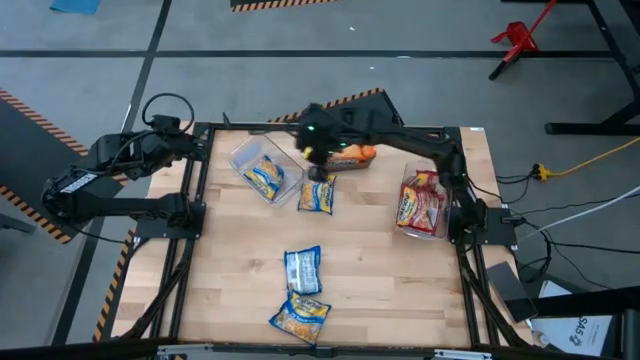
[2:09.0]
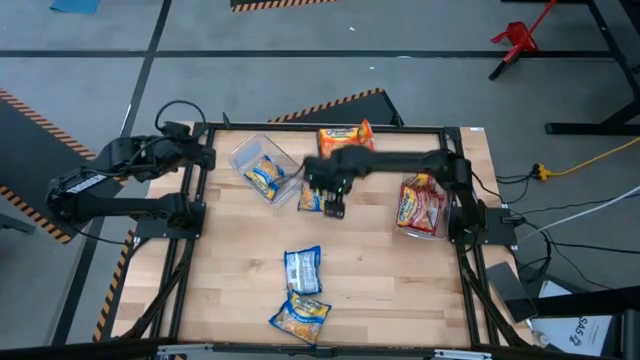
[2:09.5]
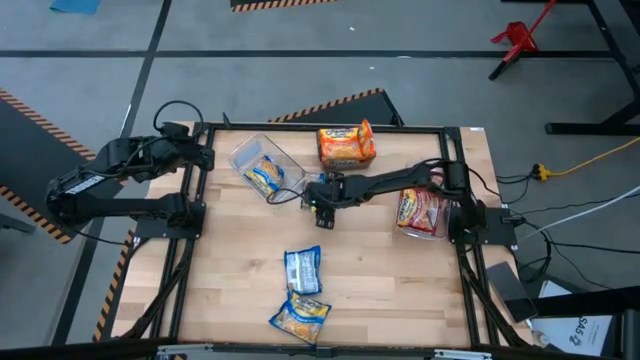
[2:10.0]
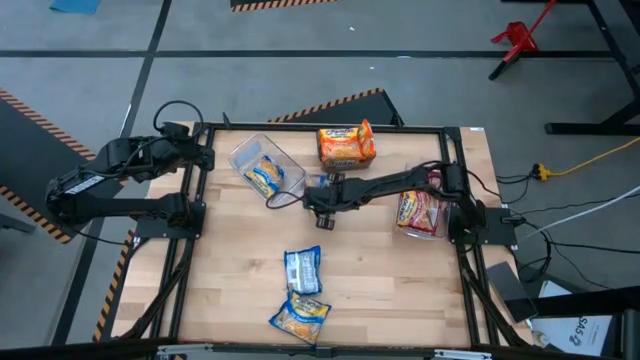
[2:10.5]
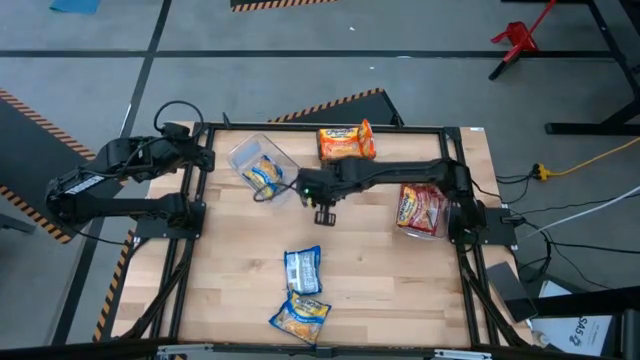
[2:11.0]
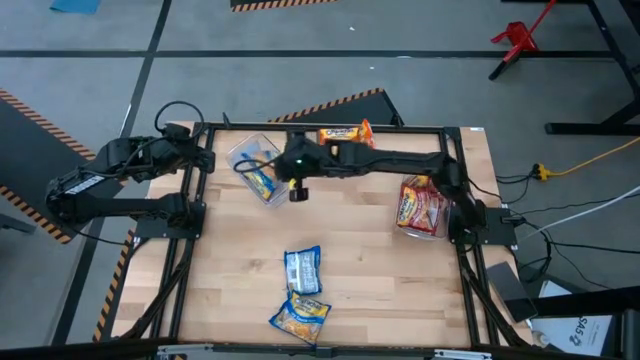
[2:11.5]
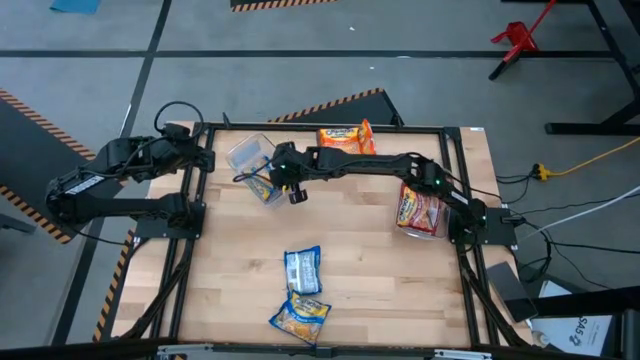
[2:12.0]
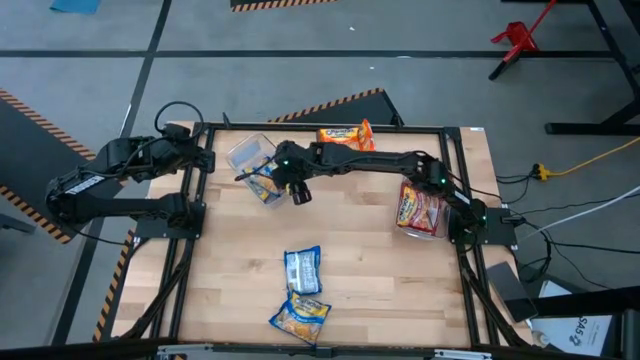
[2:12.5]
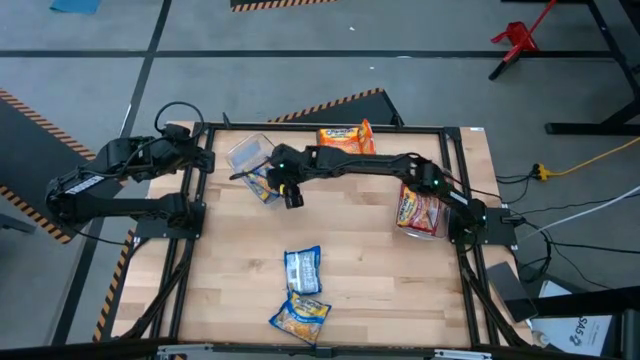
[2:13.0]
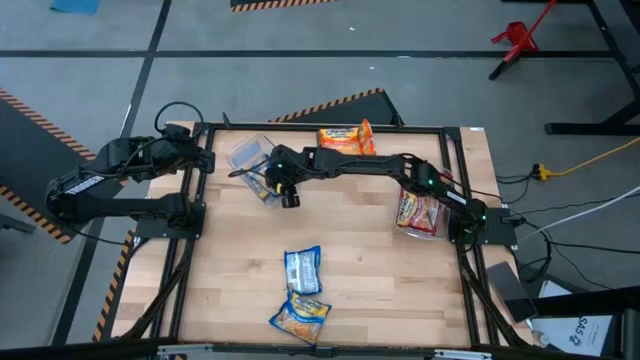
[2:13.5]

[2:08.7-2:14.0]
Task: Sort Maruchan noodles
Put the blue noodle pack into the left transparent bin

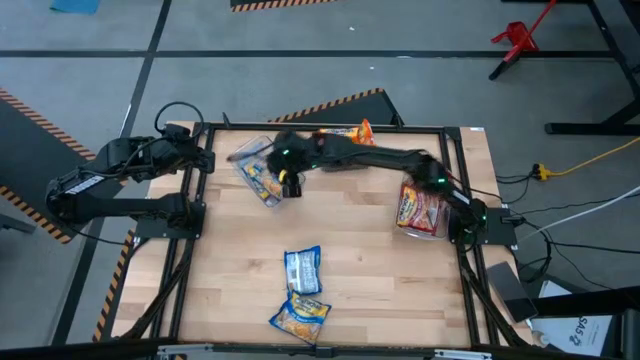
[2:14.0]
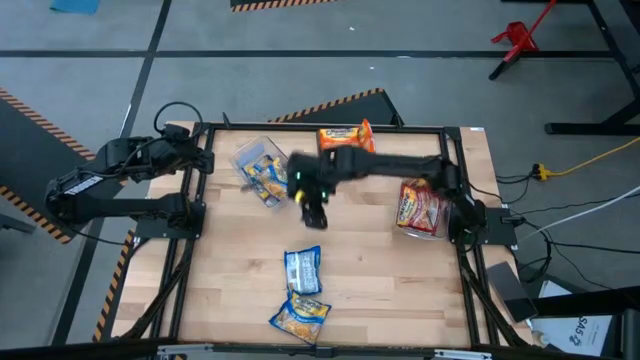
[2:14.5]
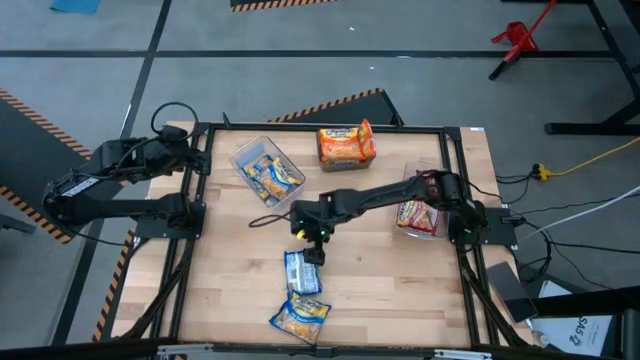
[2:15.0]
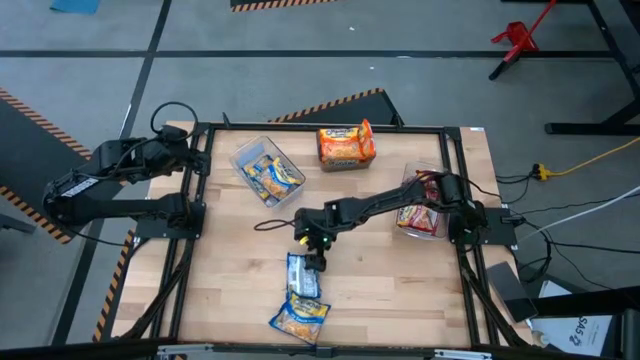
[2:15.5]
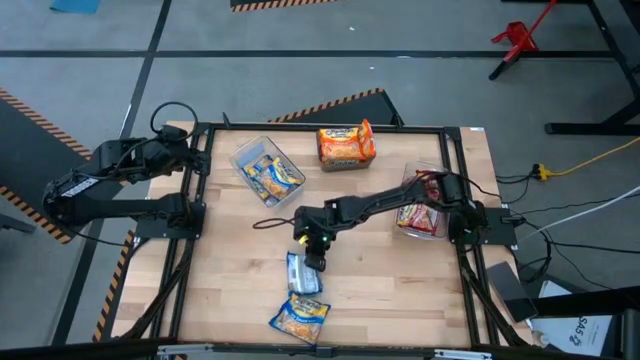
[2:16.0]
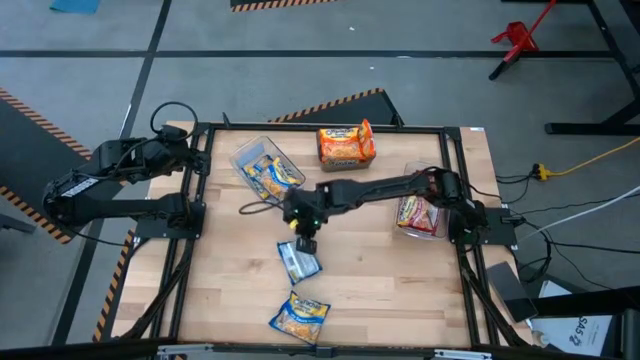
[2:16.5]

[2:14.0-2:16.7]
Put the blue noodle pack into the left transparent bin

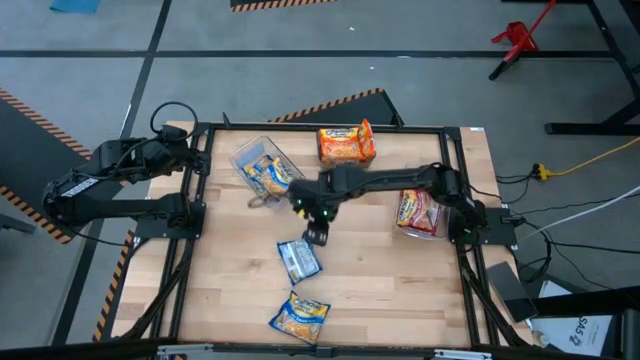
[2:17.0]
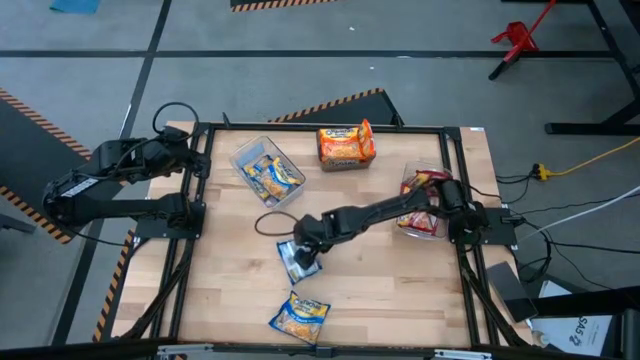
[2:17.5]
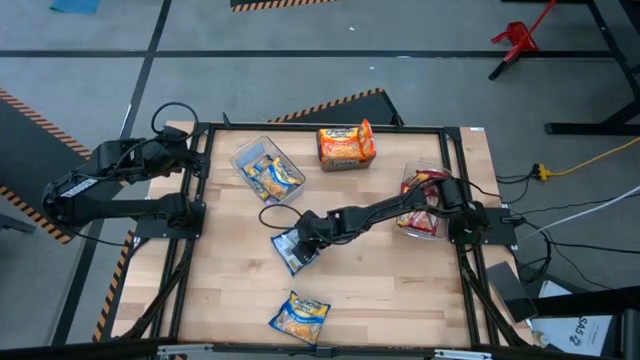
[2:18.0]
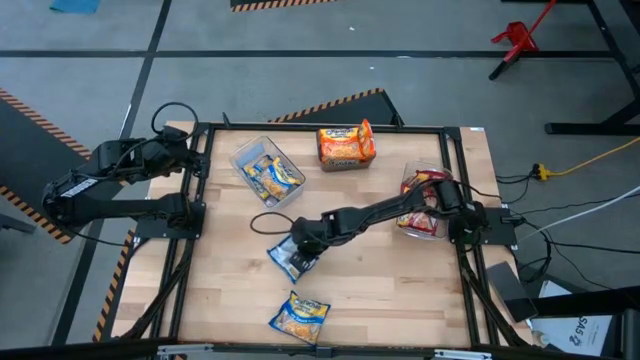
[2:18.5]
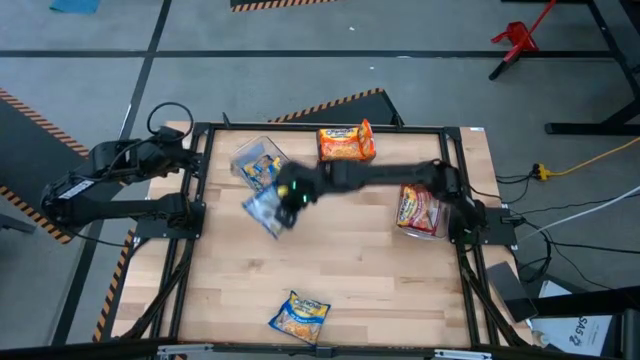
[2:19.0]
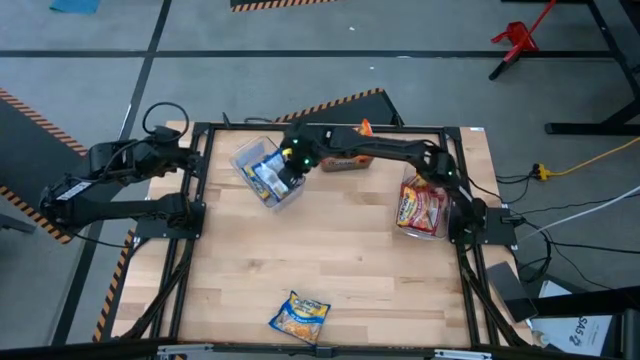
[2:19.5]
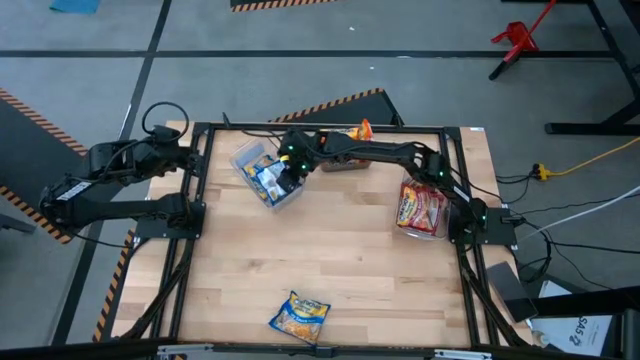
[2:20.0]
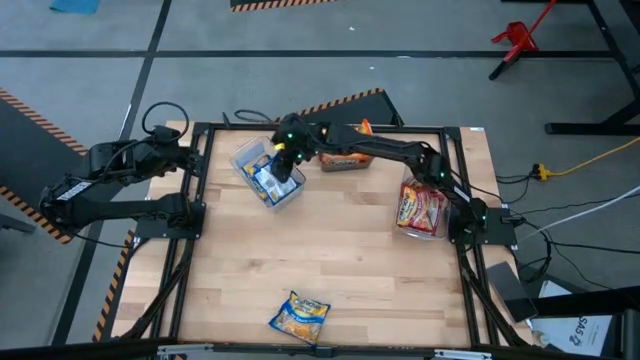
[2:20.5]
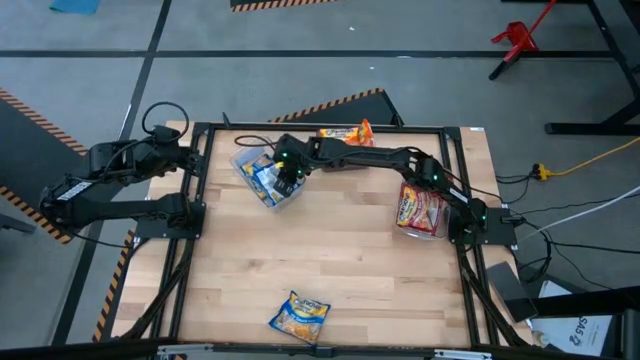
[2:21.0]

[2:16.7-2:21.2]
Put the blue noodle pack into the left transparent bin

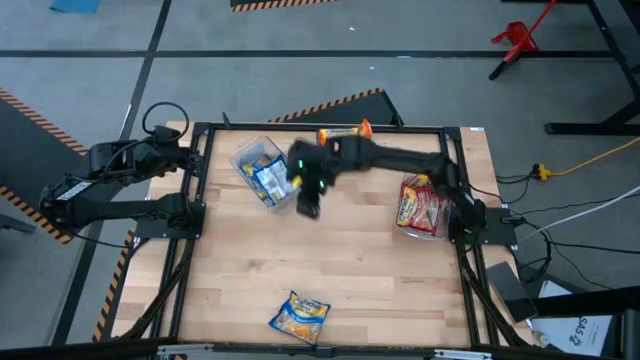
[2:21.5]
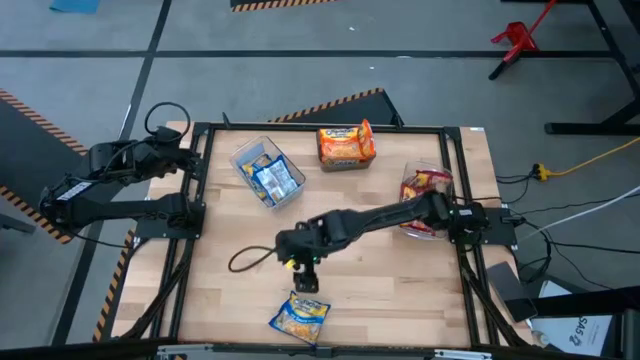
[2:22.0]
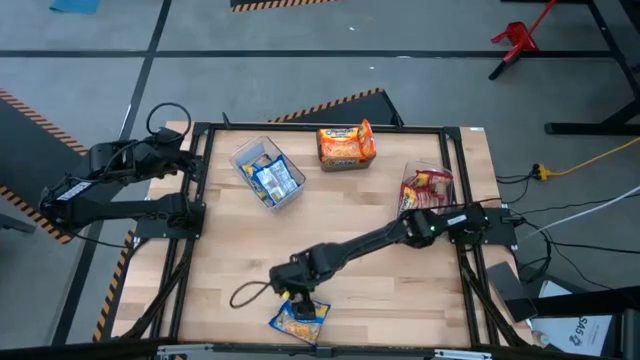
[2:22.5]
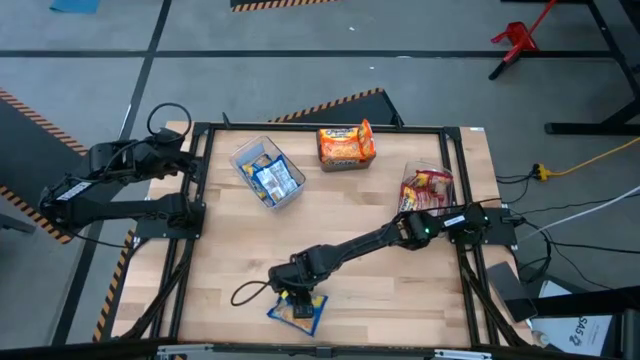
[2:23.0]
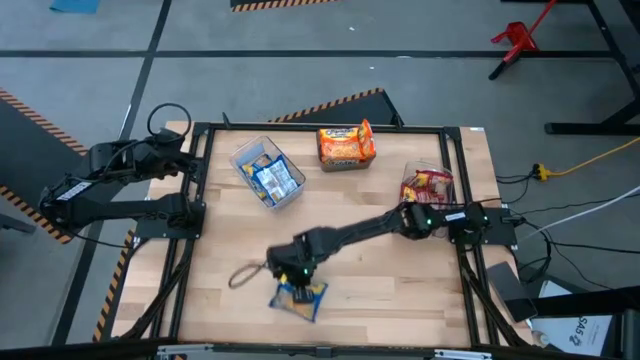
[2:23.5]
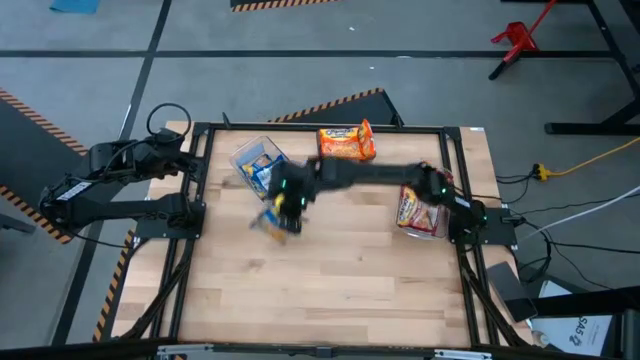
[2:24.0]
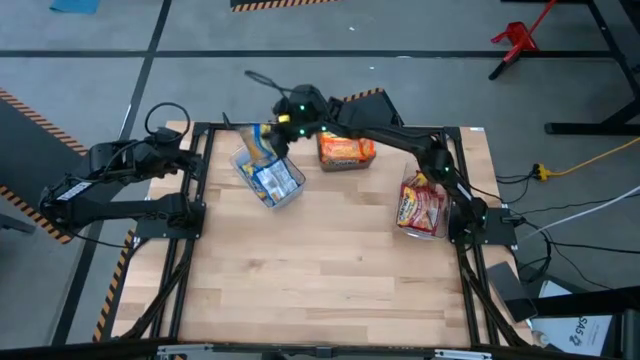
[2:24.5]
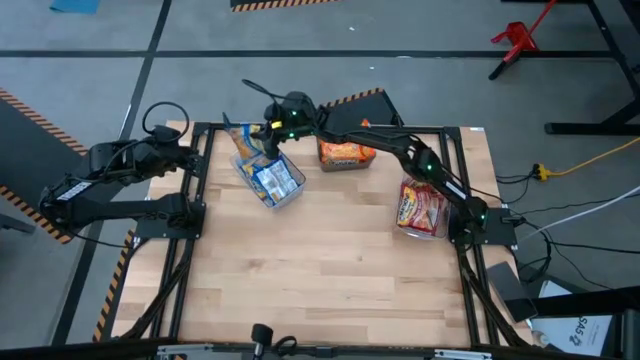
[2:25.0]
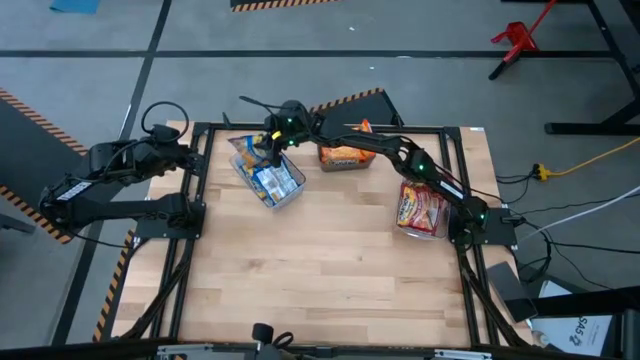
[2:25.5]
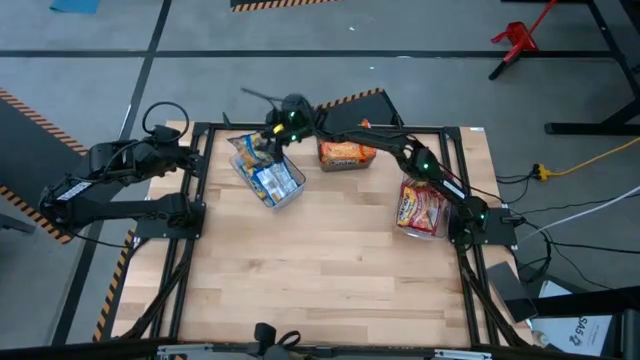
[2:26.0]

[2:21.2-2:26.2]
Put the blue noodle pack into the left transparent bin

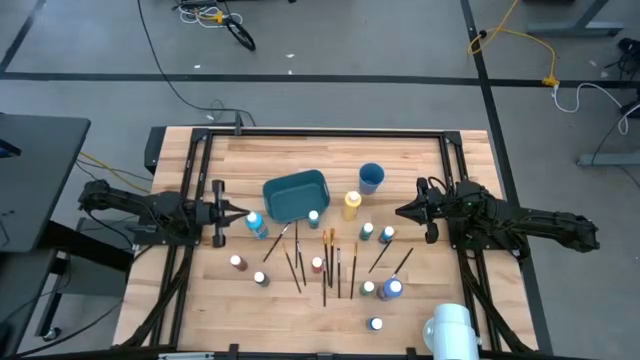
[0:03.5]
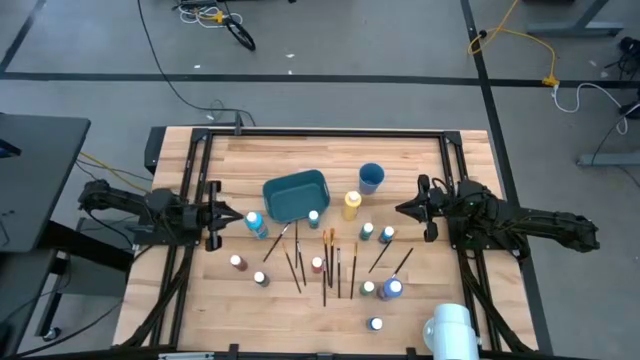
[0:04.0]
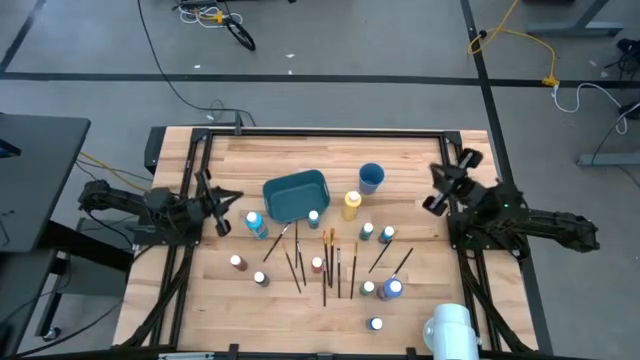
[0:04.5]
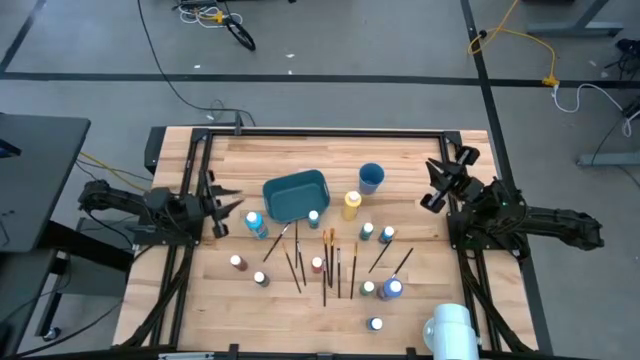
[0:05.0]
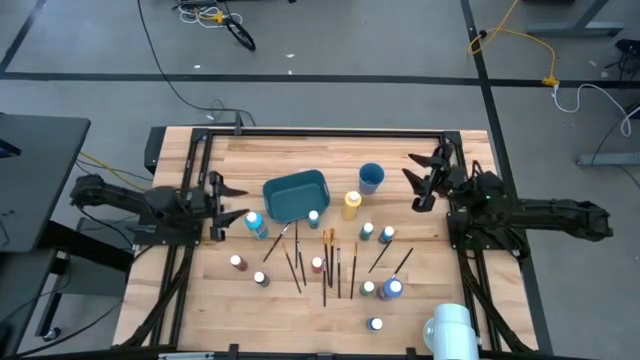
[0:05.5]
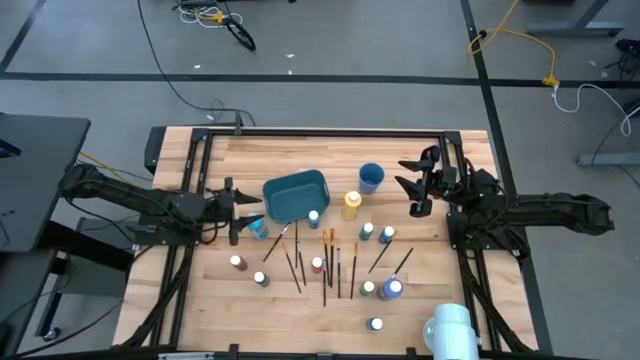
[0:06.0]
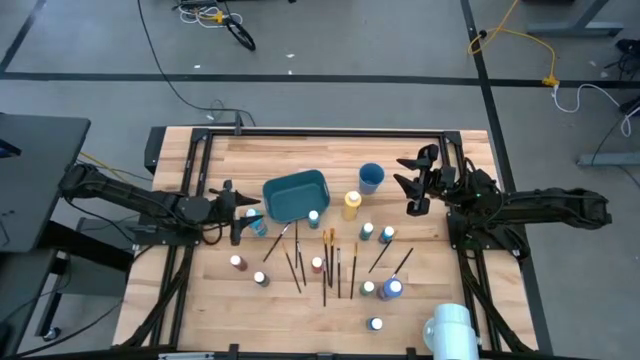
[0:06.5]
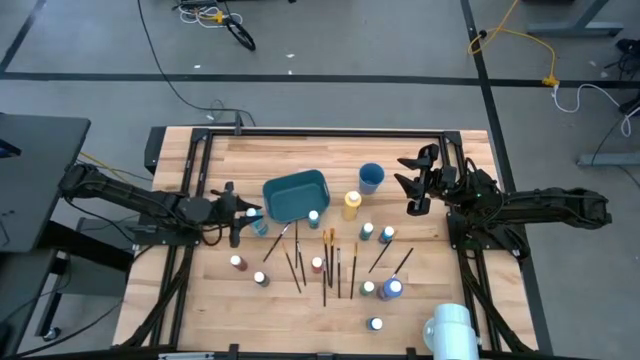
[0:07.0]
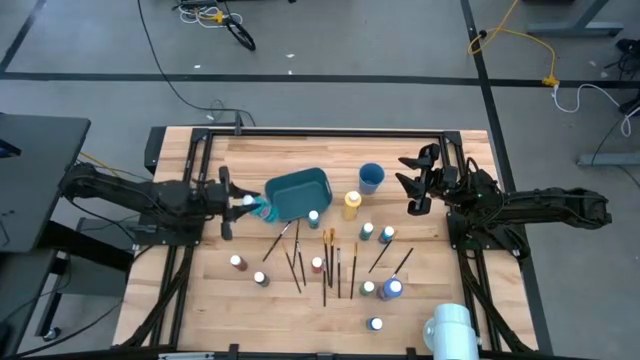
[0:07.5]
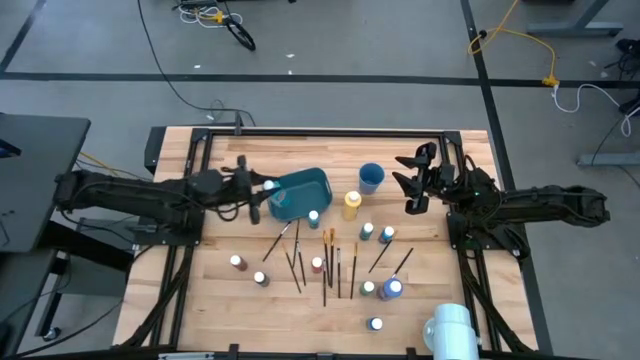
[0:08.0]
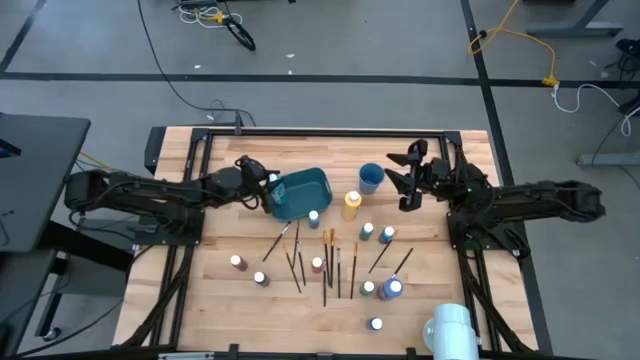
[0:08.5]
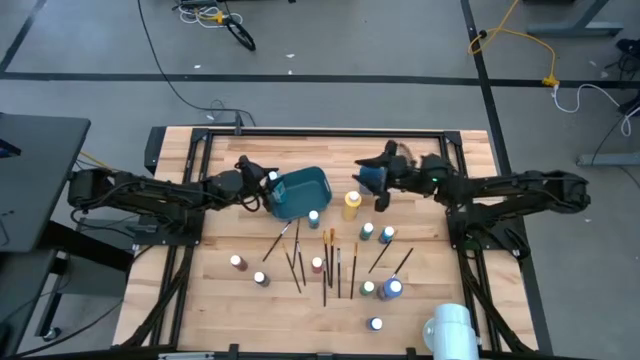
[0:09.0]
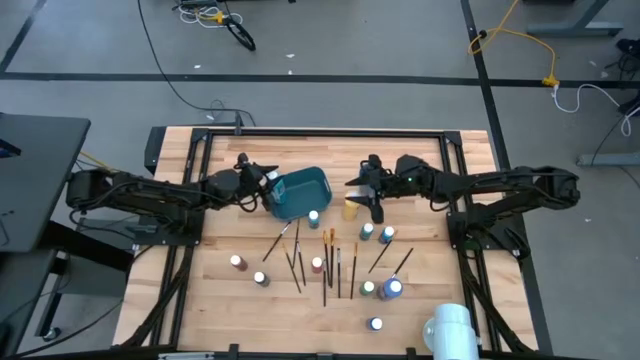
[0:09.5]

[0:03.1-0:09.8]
Task: Pick & Place Paint Supplies
Put the large light blue paint bottle into the blue bin
